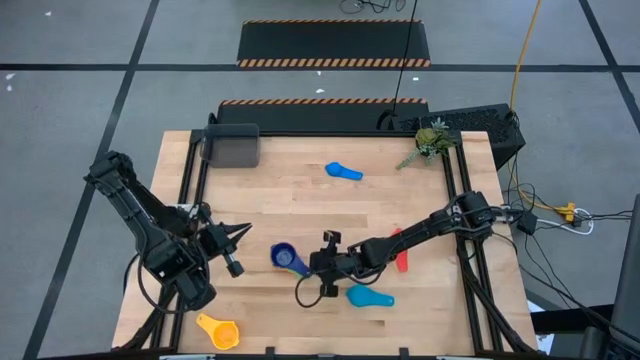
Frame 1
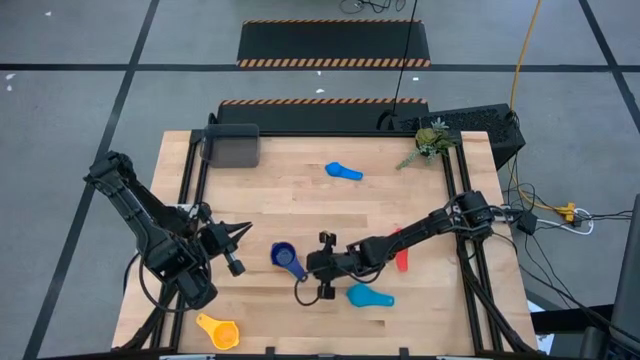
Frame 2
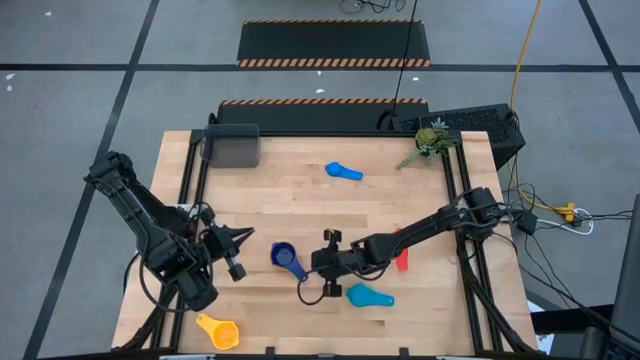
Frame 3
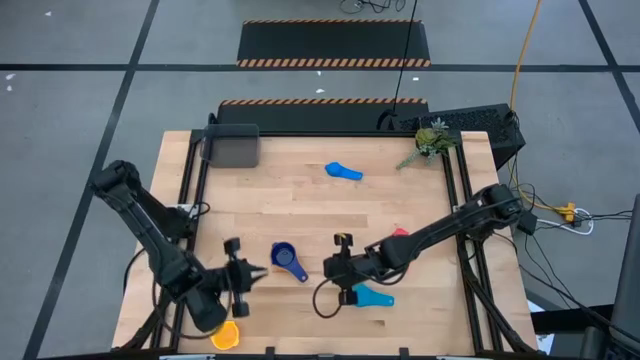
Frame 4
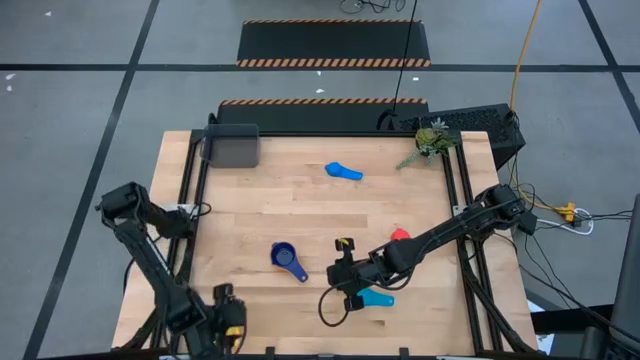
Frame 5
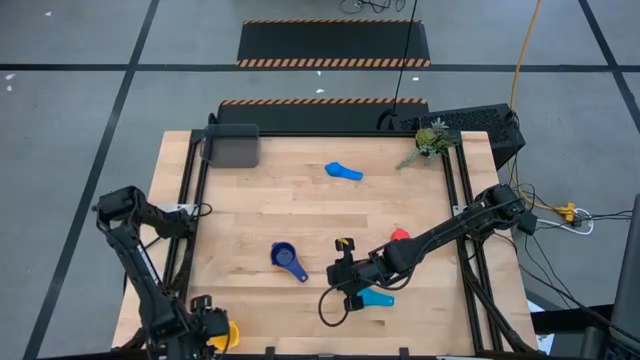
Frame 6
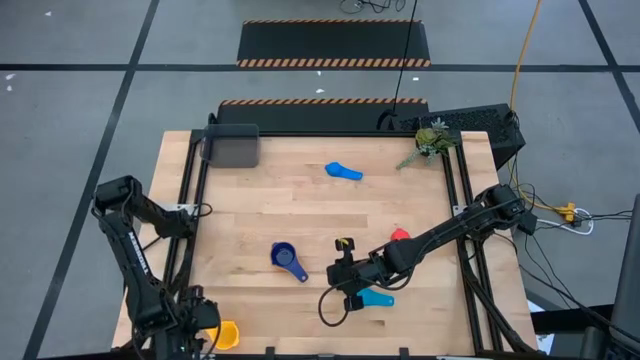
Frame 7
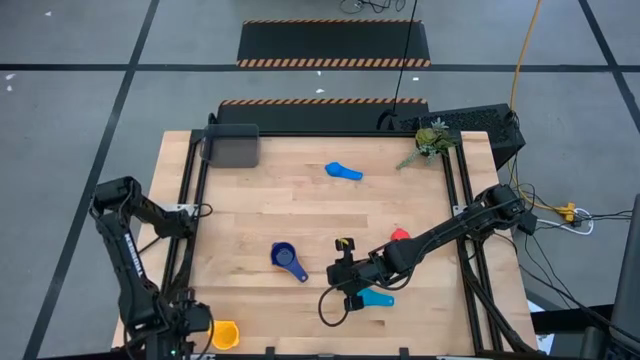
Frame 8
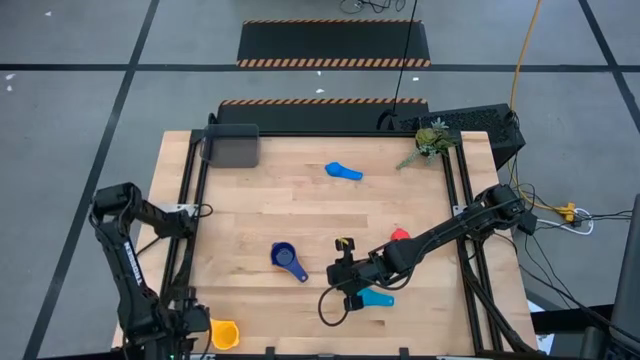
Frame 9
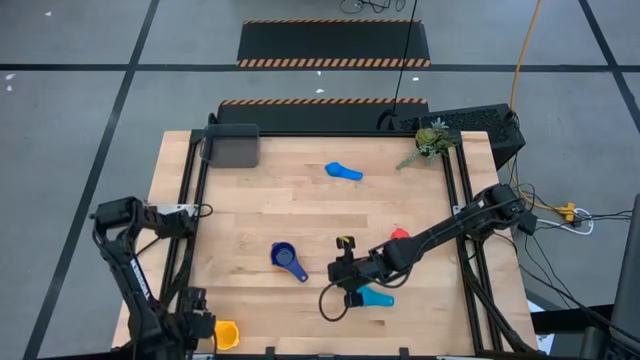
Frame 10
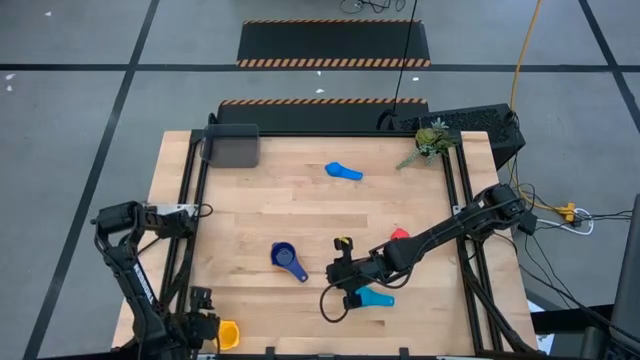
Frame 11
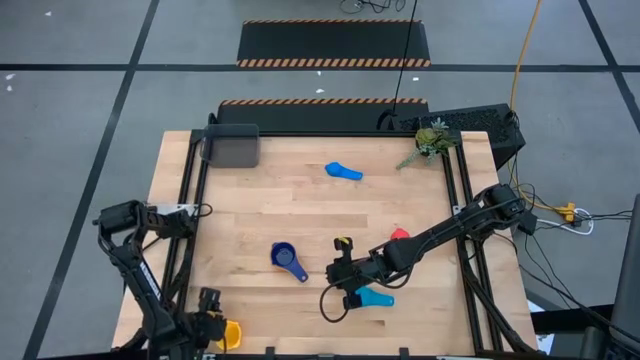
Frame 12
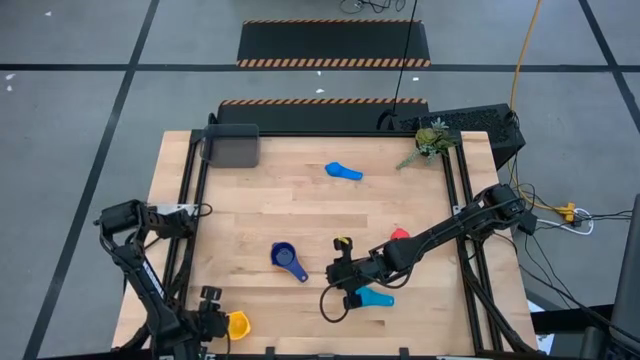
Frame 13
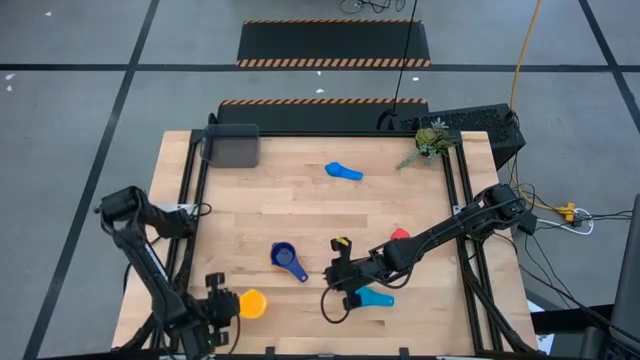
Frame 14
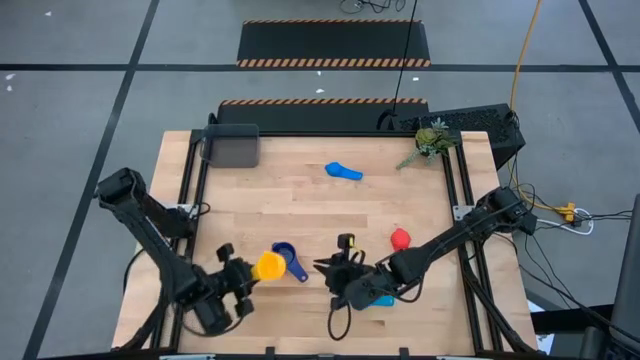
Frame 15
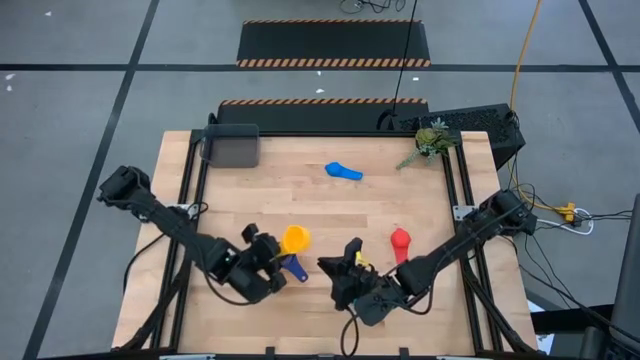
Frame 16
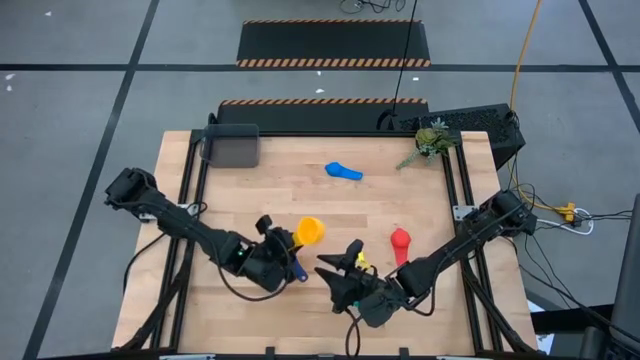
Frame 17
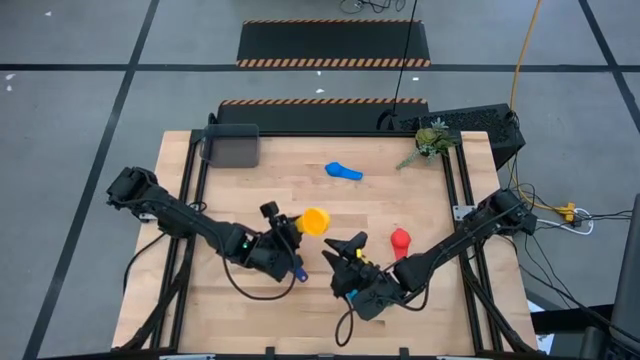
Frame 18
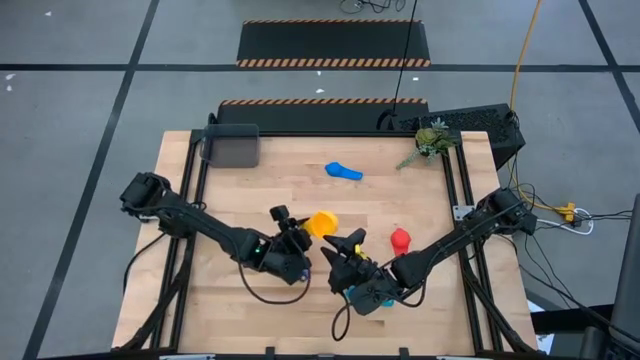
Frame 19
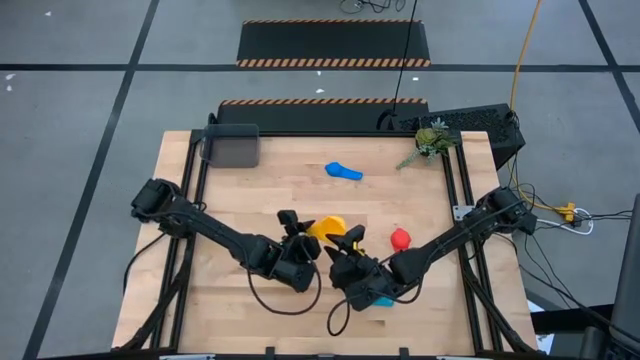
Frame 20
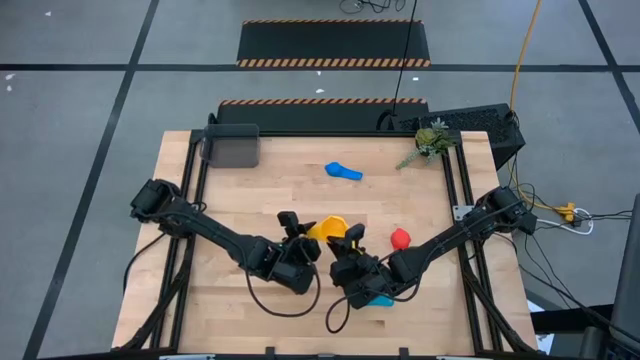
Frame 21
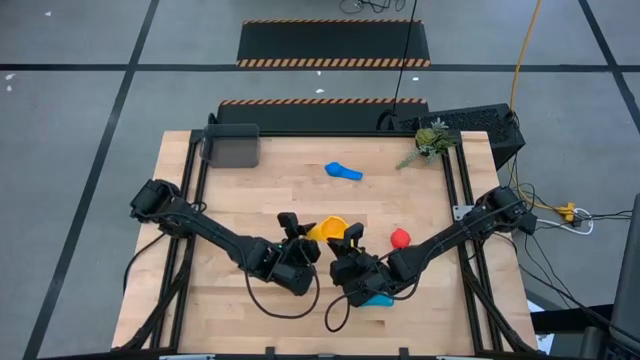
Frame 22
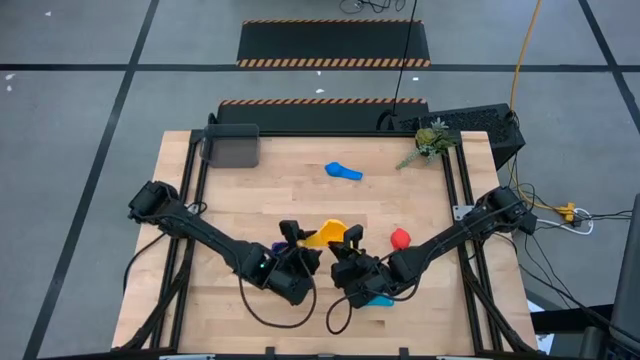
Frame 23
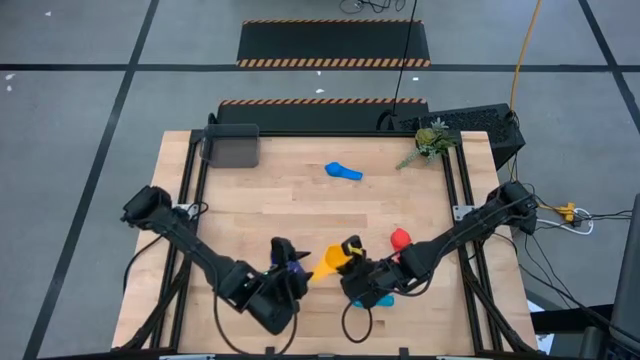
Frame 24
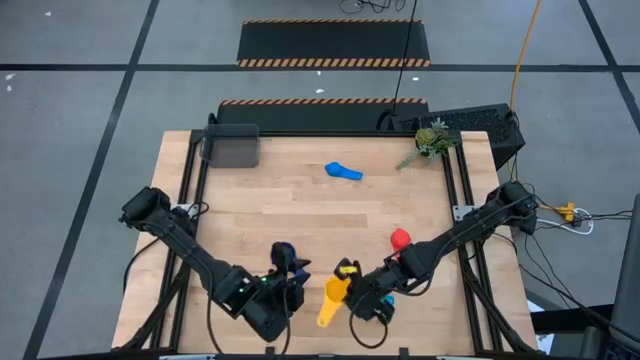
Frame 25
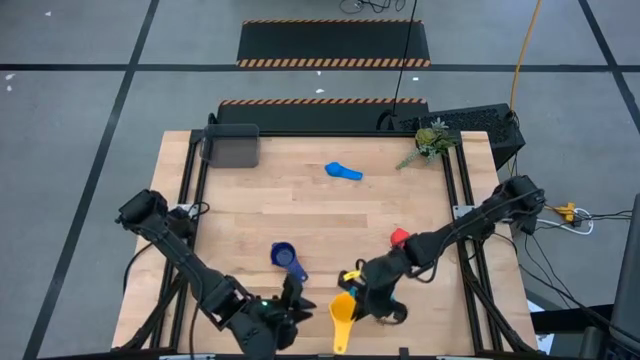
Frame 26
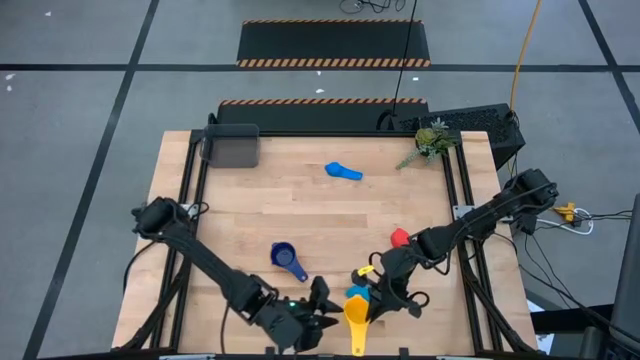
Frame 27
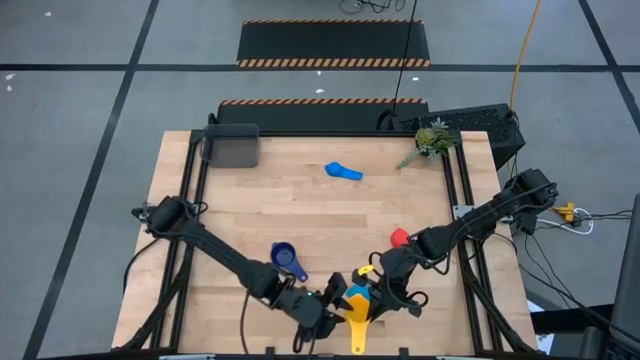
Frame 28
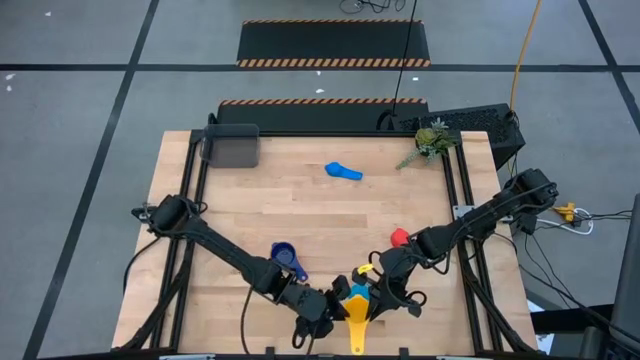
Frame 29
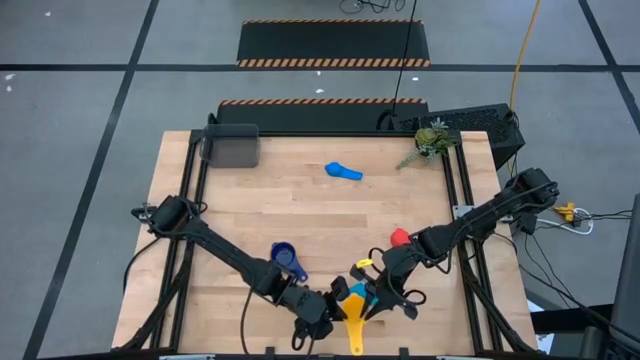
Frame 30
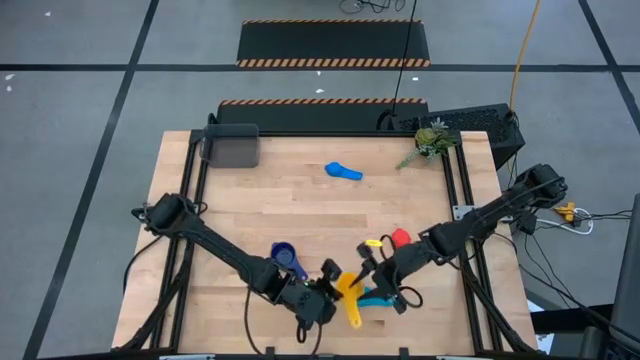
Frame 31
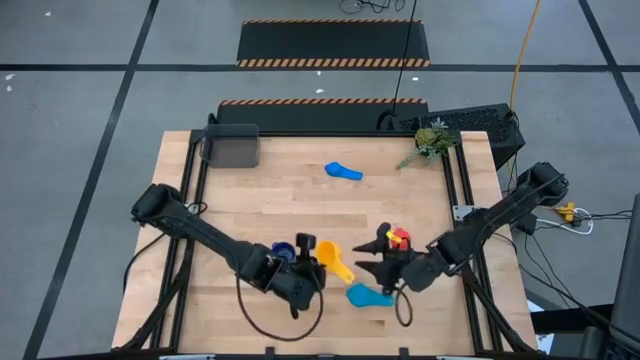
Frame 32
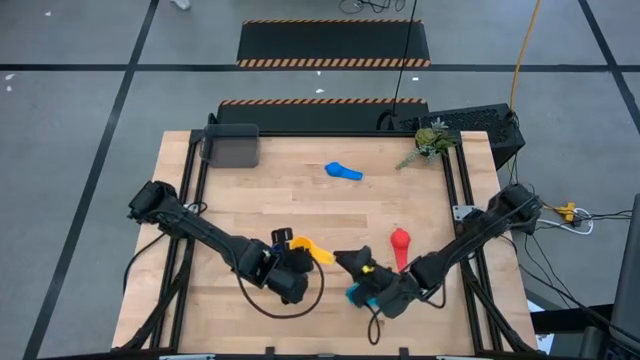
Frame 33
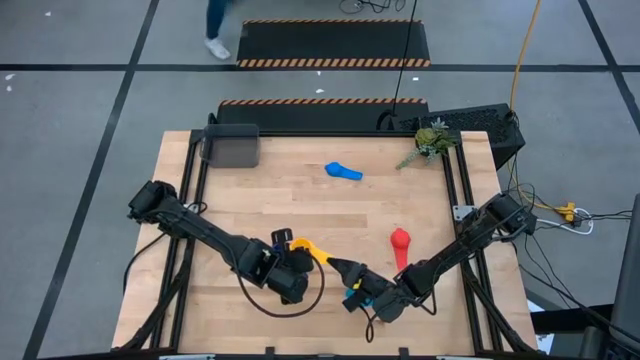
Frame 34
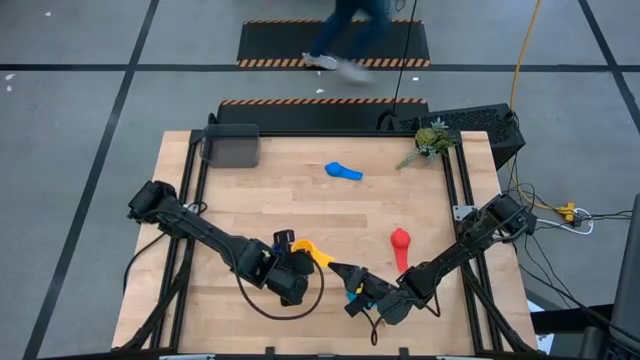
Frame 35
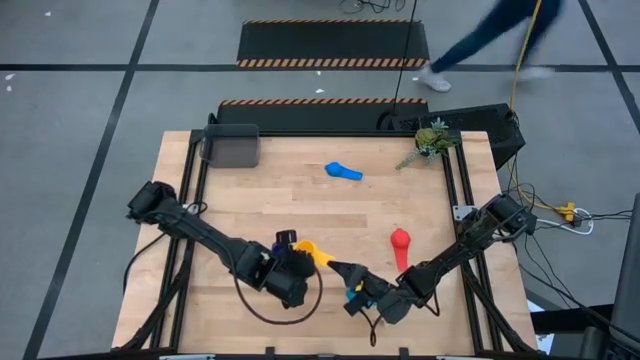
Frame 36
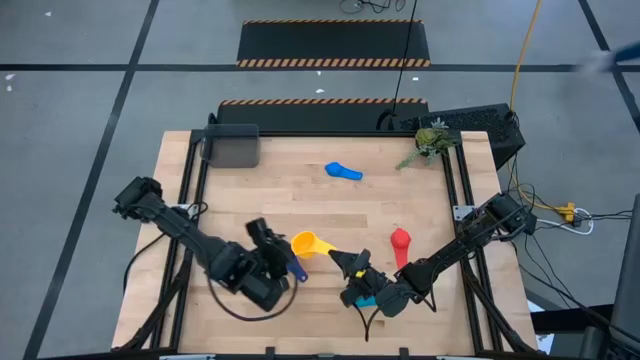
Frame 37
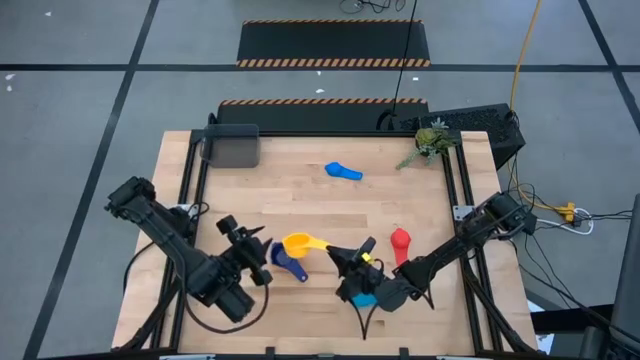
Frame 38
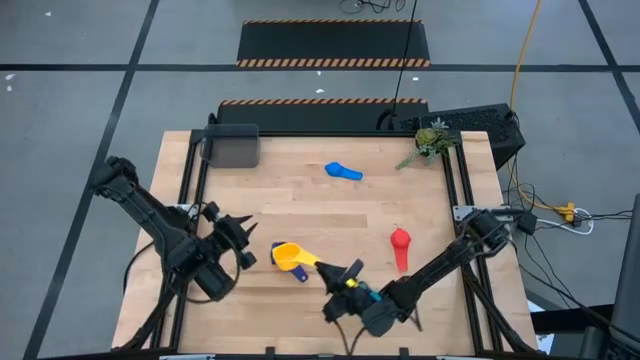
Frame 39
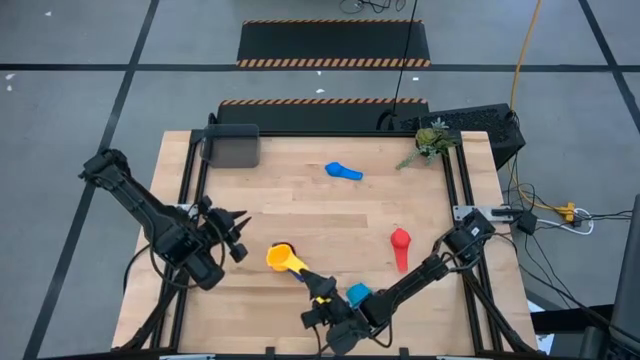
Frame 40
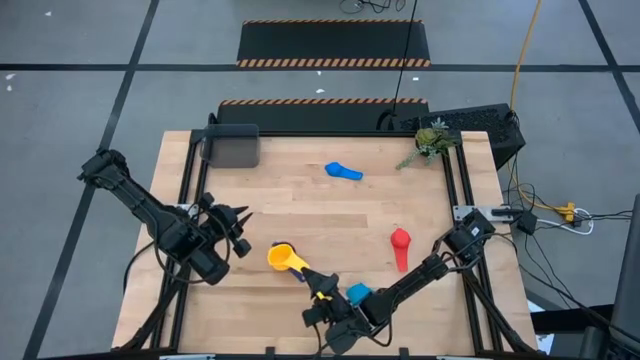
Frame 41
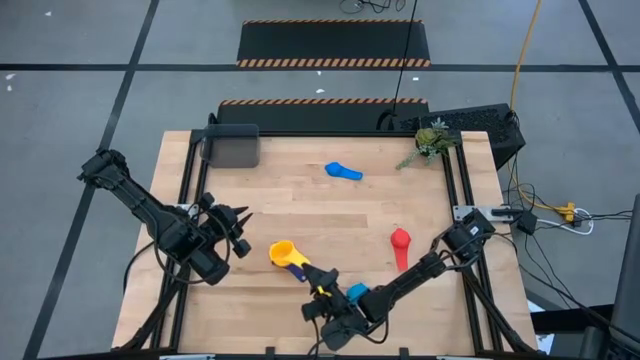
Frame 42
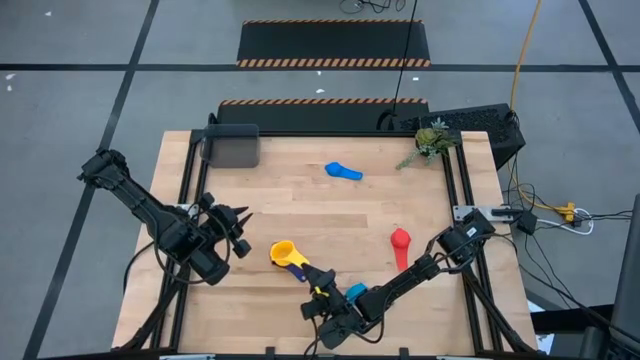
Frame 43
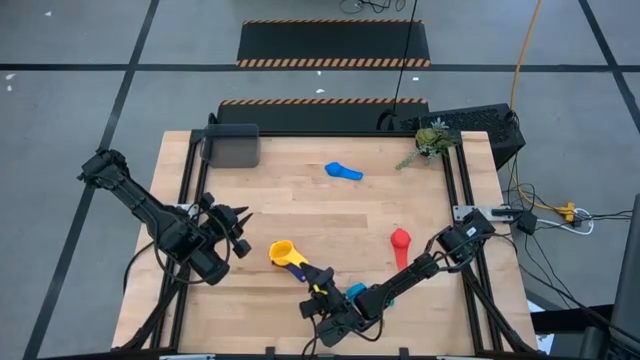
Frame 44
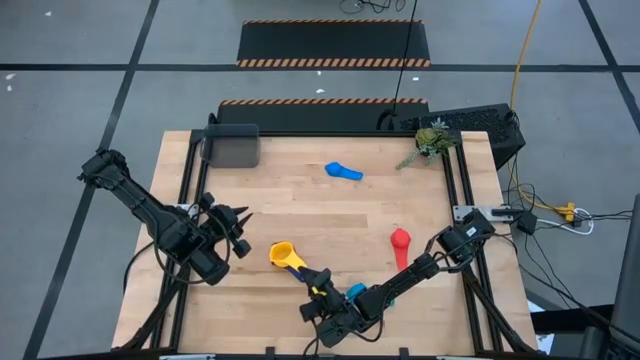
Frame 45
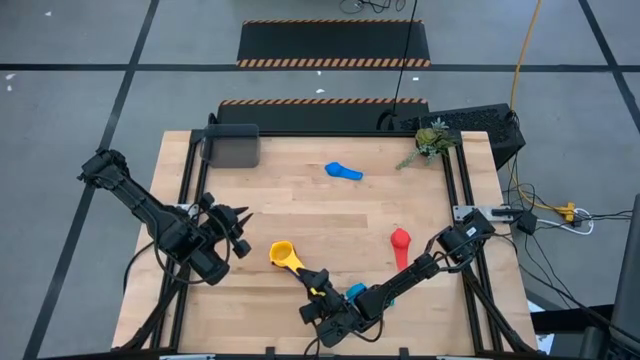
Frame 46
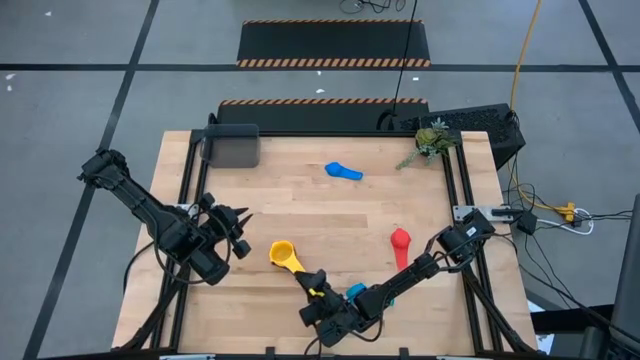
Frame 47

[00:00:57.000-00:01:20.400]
Task: Nest measuring cups in basket
Stack the yellow measuring cup on top of the purple measuring cup
